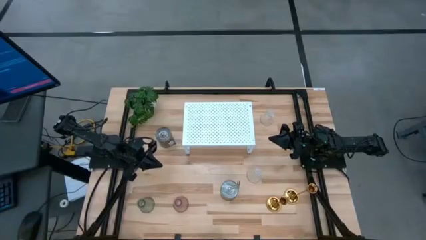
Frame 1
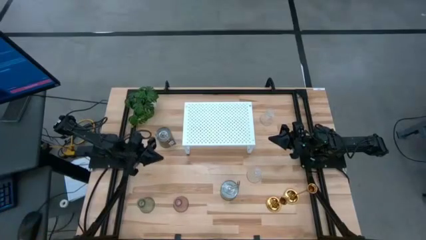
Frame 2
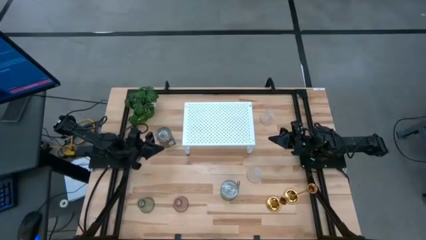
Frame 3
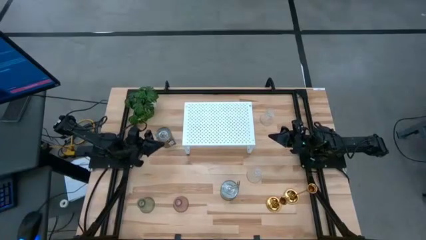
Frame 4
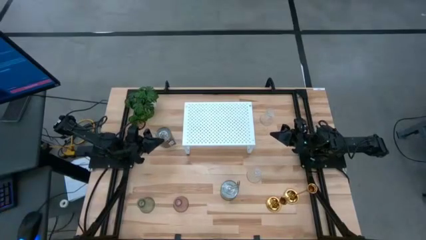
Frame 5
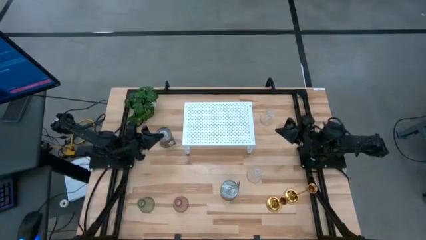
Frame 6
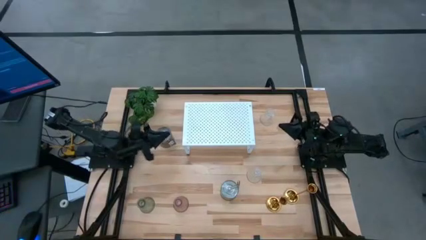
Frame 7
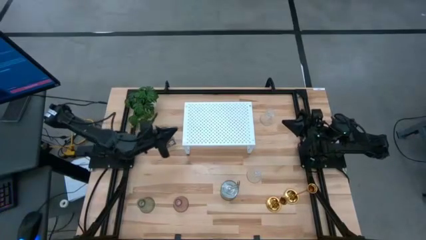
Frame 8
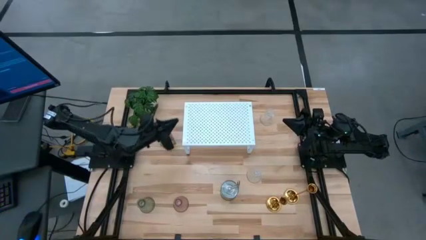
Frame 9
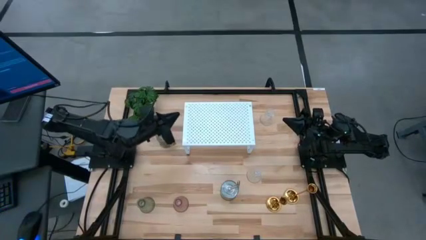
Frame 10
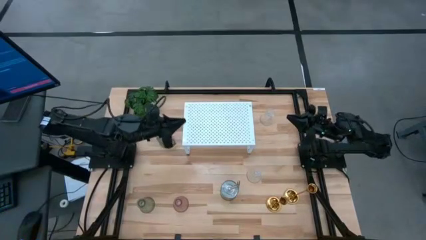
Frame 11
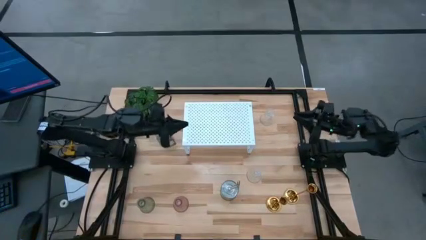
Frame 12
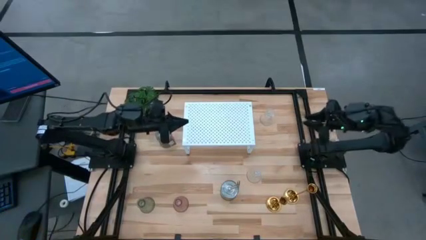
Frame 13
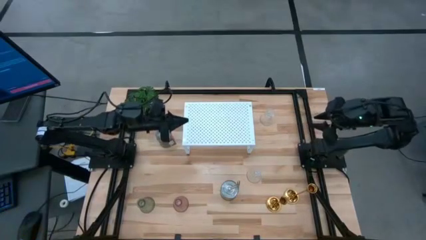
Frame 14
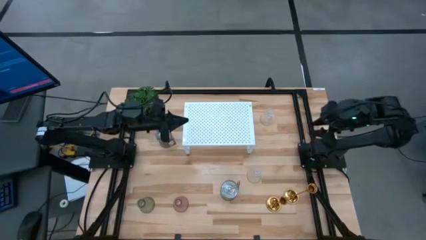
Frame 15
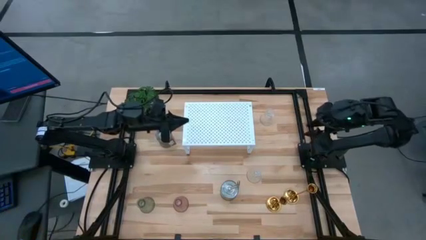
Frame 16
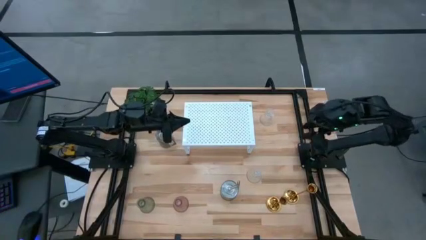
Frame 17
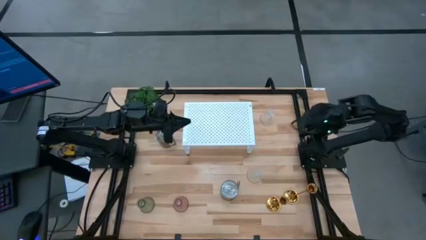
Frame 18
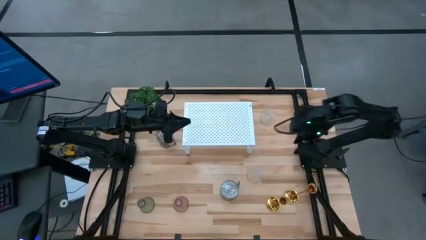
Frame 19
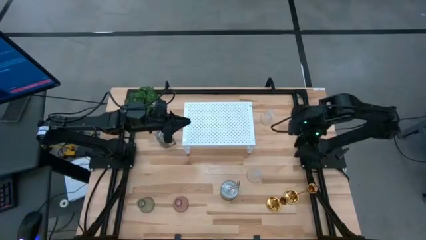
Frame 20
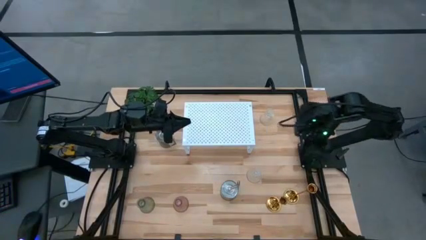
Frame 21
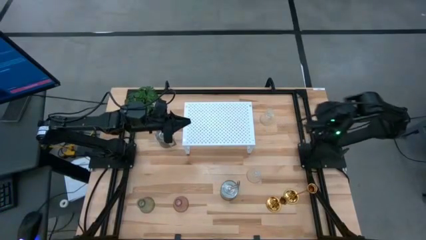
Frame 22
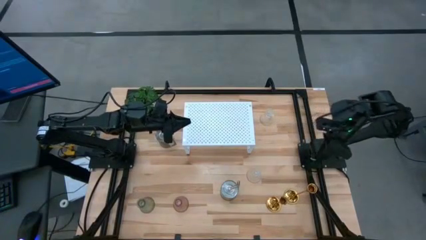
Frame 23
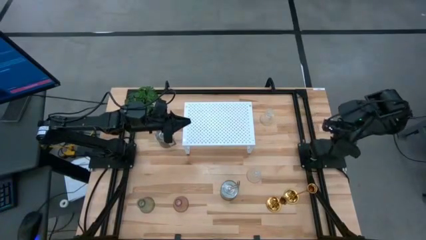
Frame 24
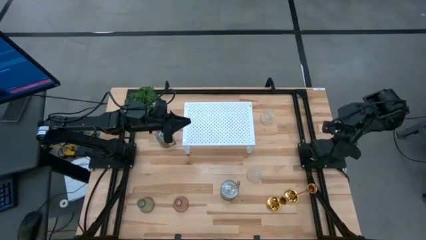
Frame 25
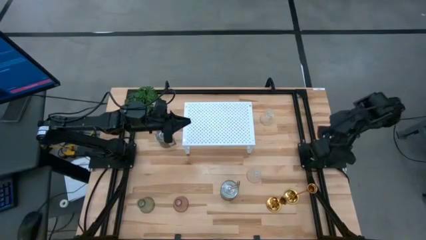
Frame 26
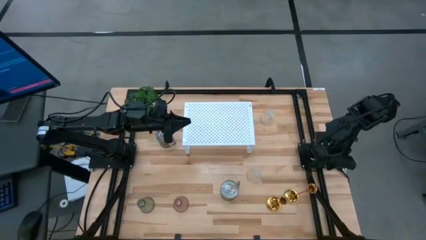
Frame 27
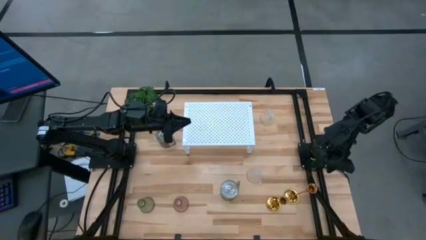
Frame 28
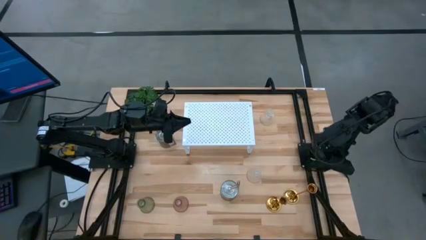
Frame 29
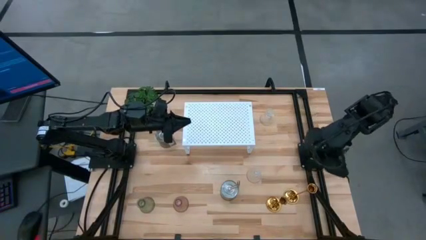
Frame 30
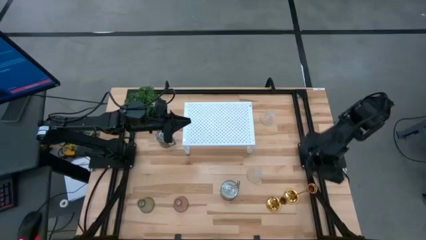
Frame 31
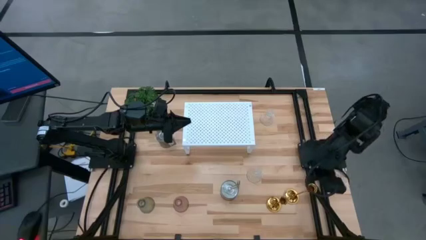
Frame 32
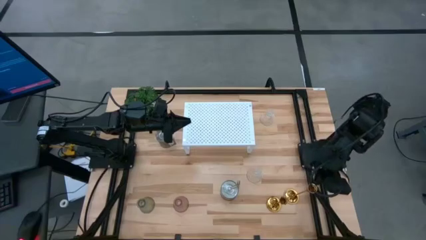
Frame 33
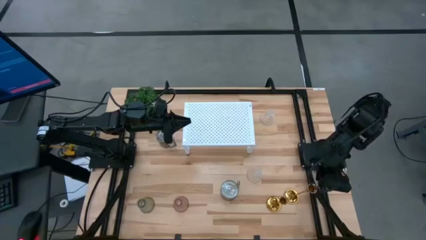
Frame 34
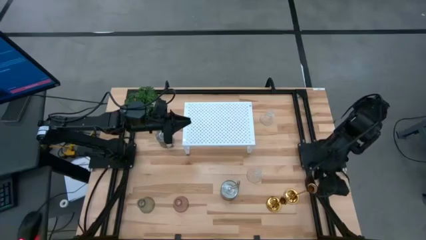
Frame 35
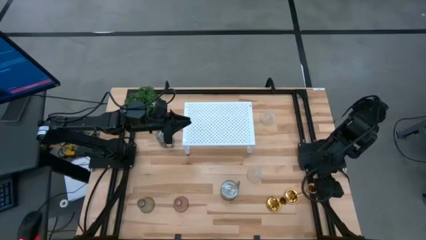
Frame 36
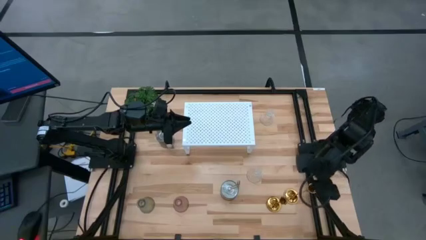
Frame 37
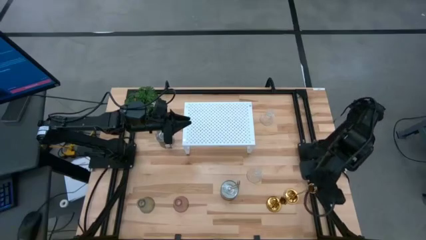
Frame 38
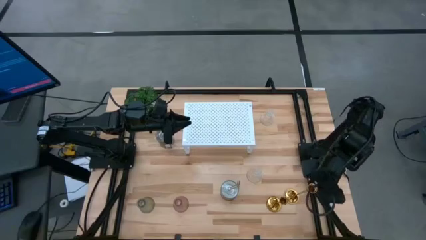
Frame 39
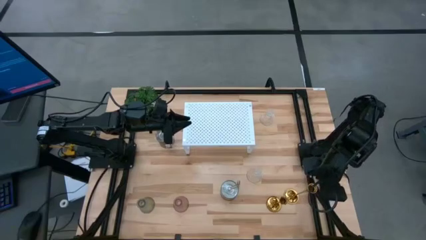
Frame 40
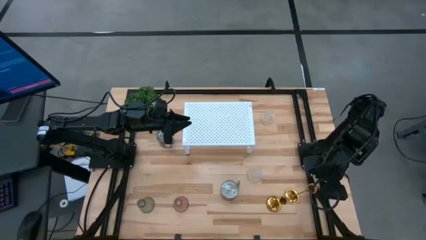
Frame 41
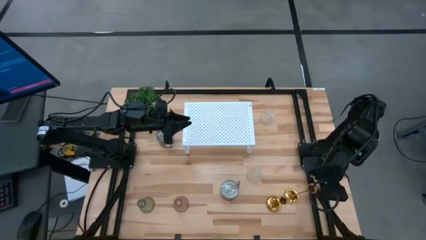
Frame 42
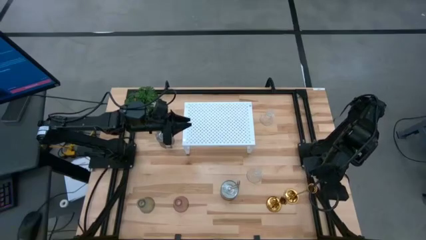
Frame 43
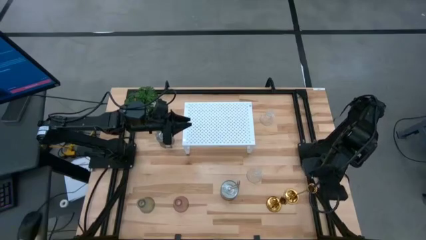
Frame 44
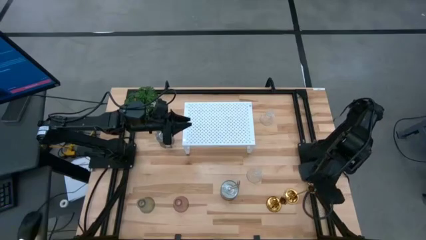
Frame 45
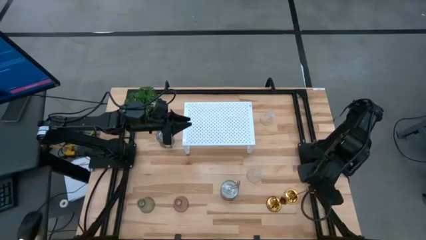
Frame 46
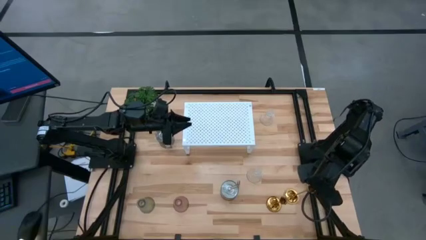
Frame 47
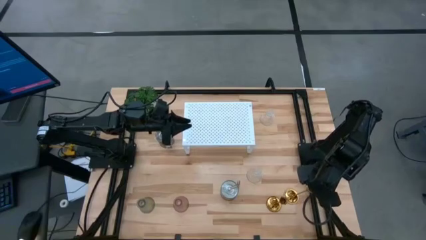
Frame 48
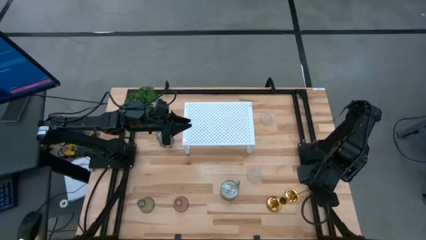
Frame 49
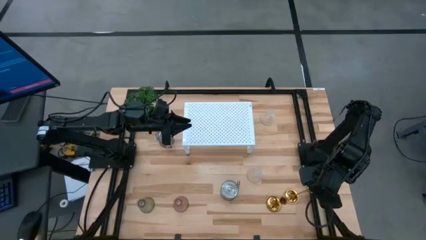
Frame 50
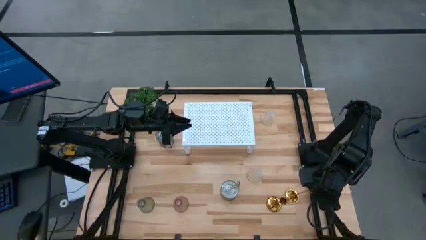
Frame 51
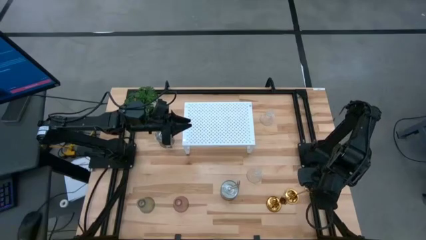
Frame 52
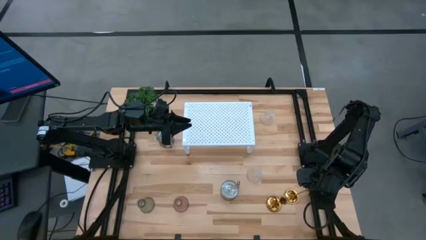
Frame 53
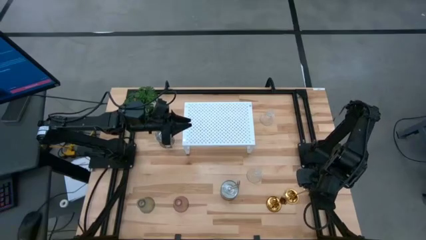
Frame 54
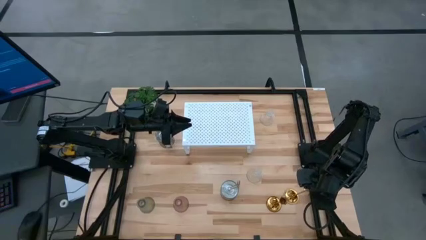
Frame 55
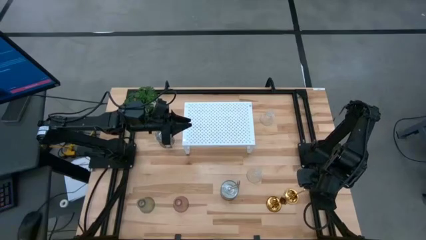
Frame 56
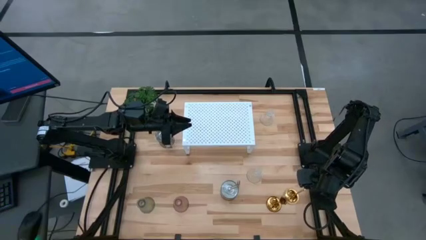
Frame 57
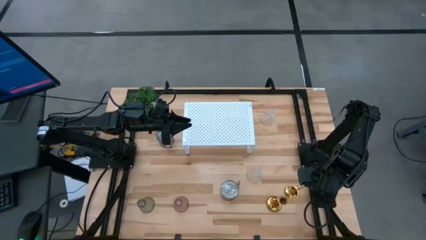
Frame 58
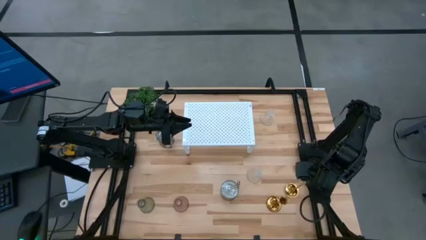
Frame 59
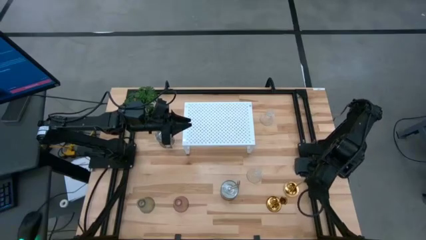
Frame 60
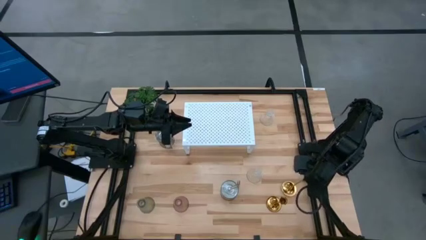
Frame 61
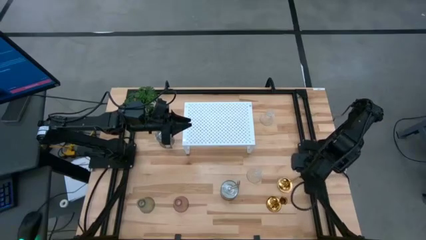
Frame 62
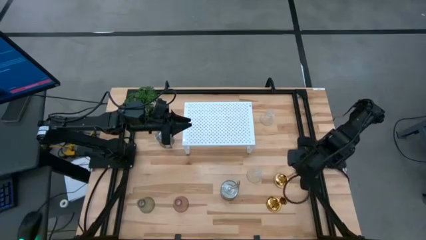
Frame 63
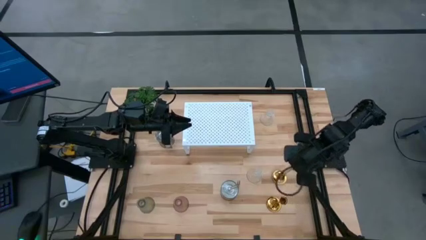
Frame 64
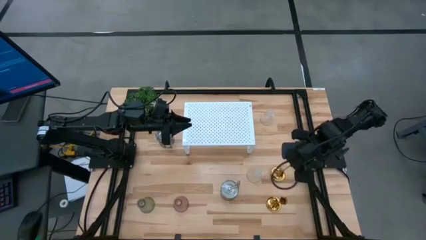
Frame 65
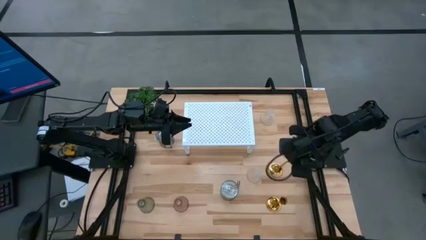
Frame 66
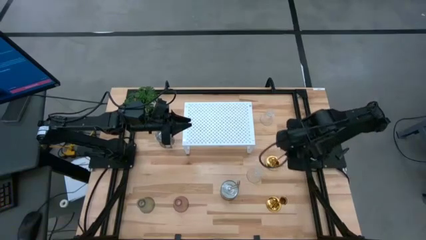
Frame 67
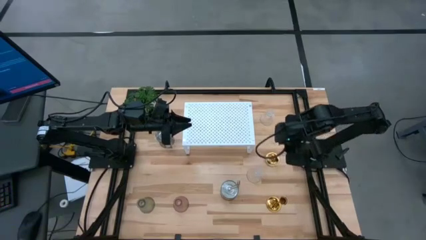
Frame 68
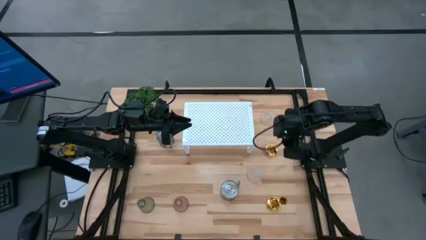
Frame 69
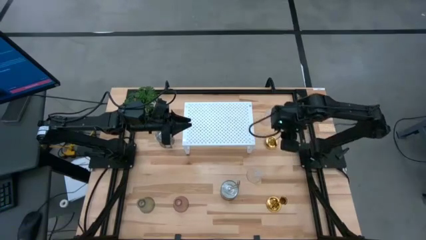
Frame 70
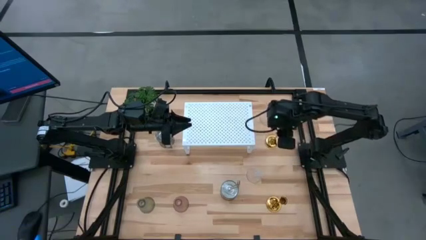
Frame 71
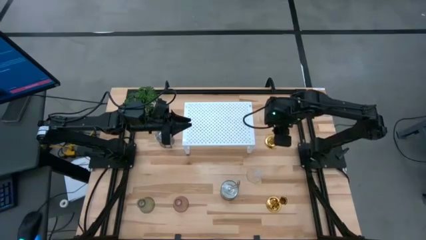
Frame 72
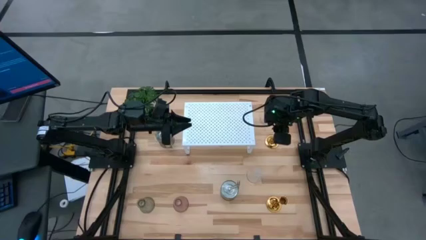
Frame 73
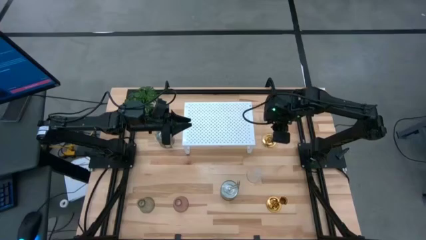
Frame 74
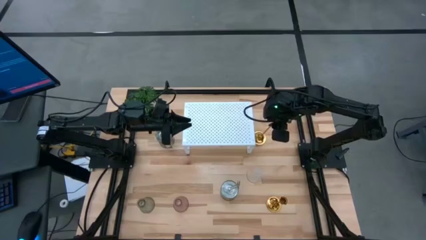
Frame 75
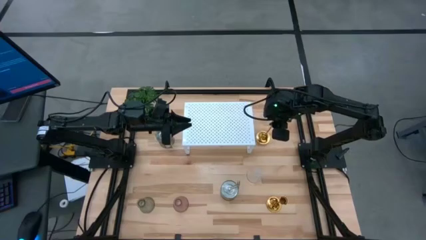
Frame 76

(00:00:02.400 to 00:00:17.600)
Task: Pick & Place candle stick holders
Put the top gold candle holder on the shelf
